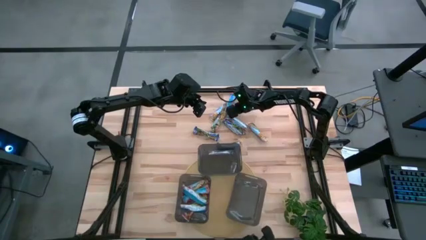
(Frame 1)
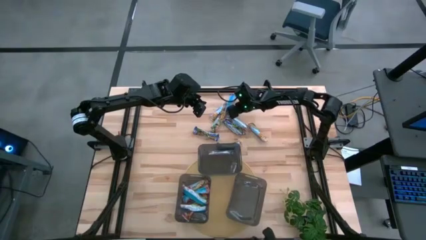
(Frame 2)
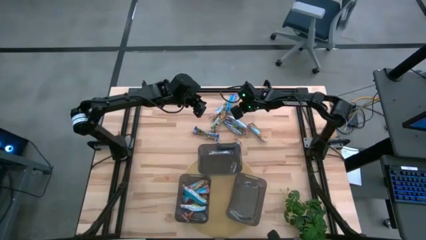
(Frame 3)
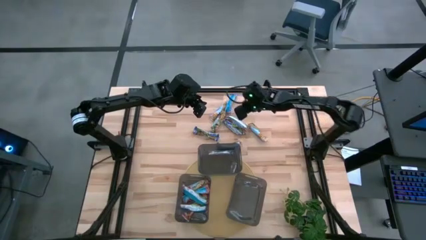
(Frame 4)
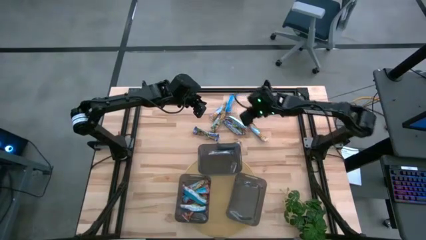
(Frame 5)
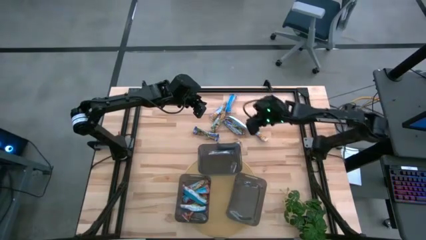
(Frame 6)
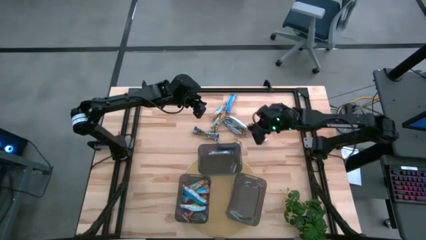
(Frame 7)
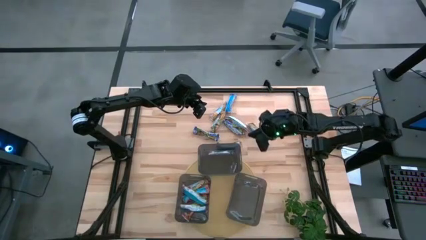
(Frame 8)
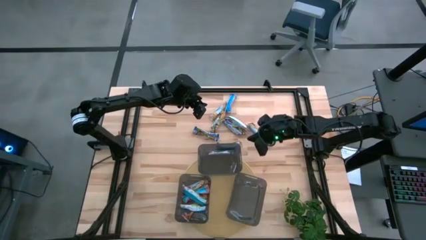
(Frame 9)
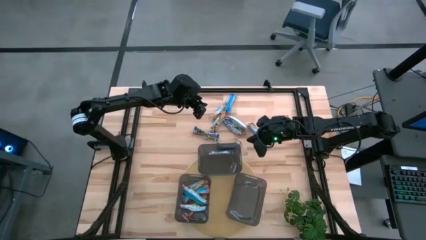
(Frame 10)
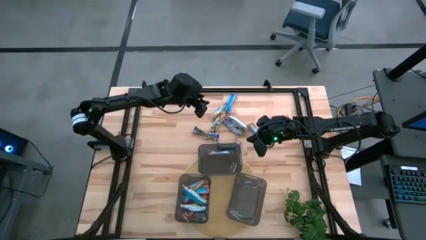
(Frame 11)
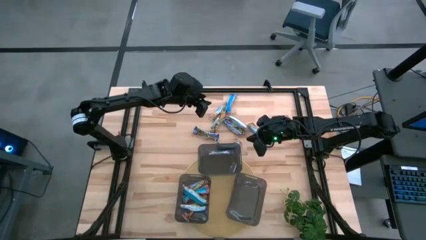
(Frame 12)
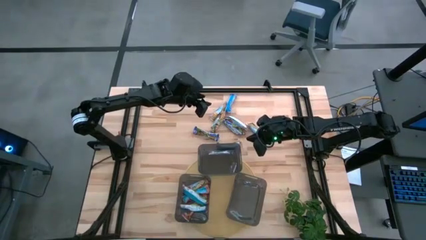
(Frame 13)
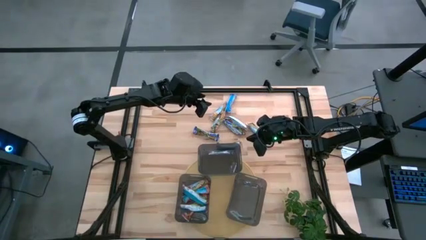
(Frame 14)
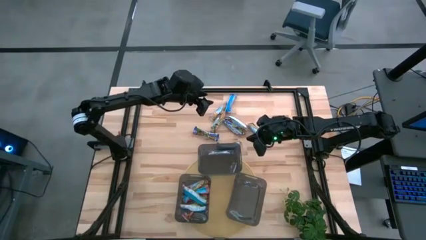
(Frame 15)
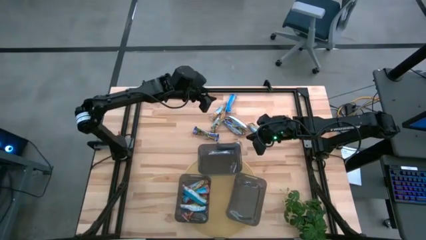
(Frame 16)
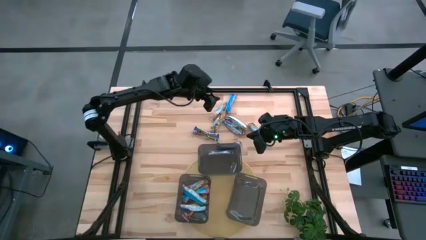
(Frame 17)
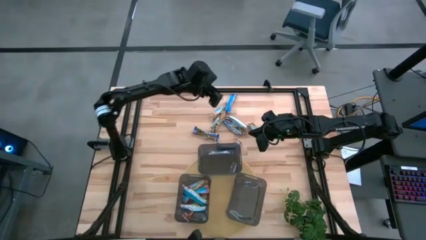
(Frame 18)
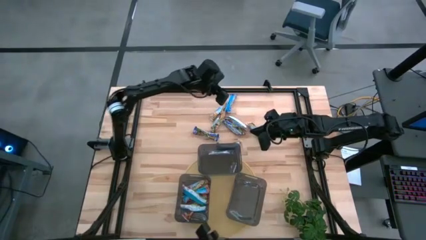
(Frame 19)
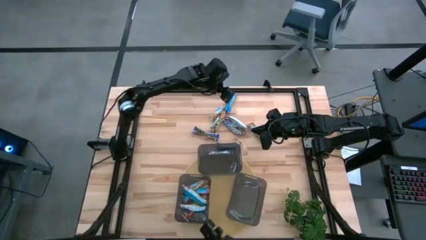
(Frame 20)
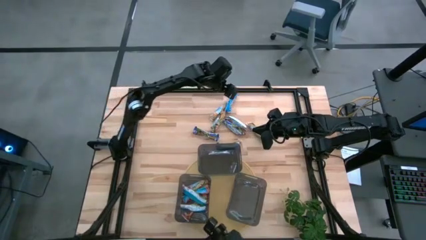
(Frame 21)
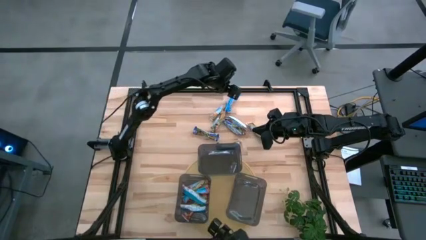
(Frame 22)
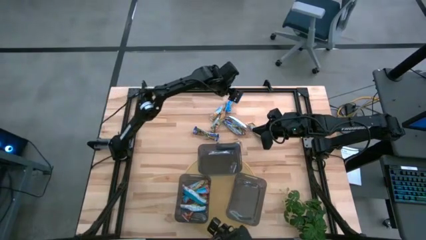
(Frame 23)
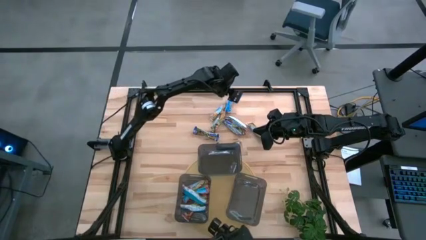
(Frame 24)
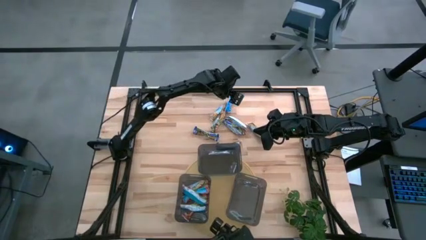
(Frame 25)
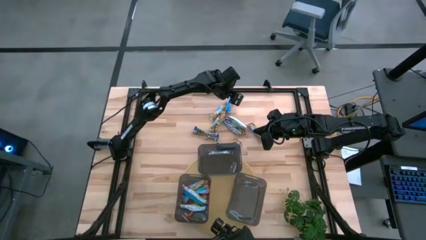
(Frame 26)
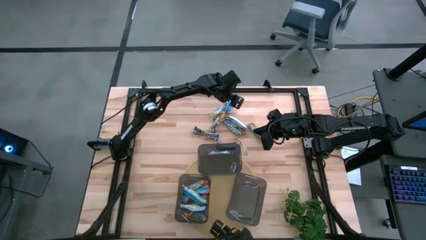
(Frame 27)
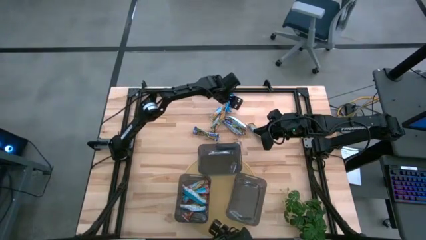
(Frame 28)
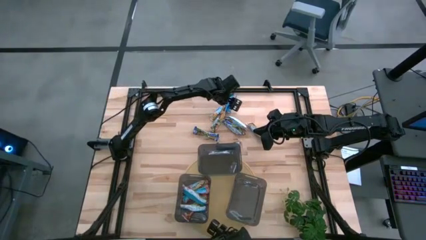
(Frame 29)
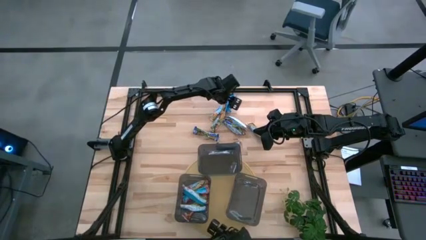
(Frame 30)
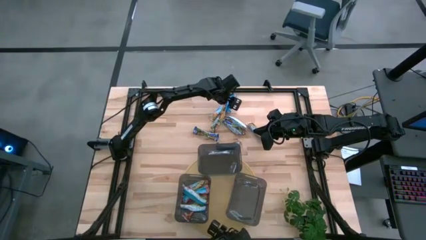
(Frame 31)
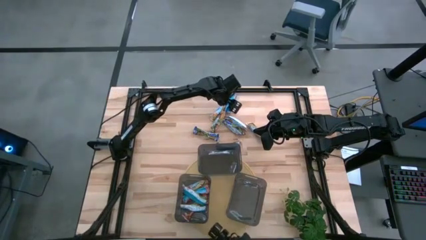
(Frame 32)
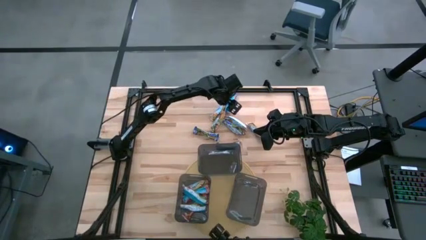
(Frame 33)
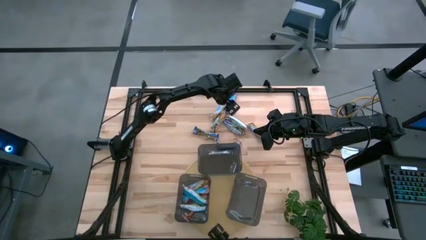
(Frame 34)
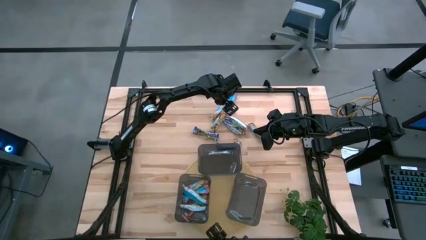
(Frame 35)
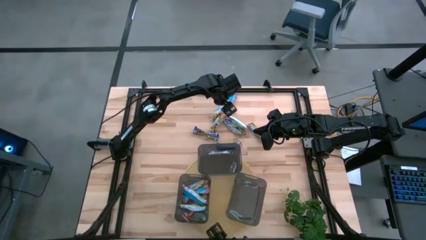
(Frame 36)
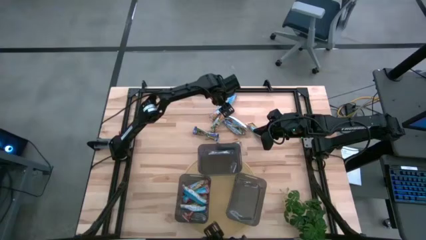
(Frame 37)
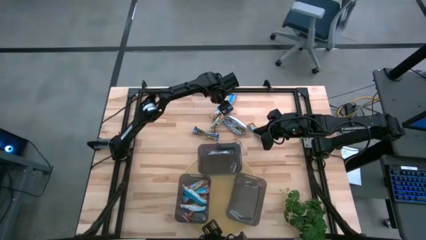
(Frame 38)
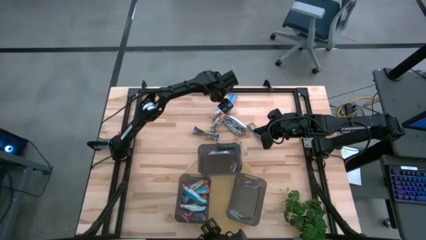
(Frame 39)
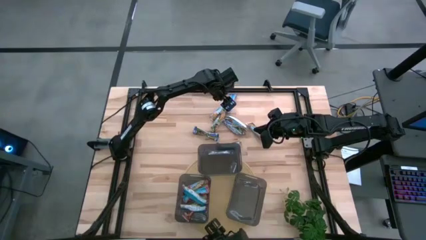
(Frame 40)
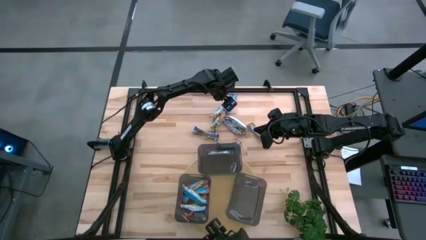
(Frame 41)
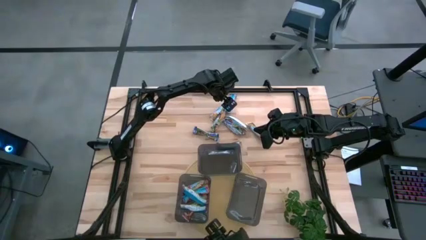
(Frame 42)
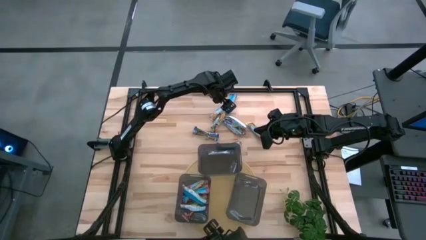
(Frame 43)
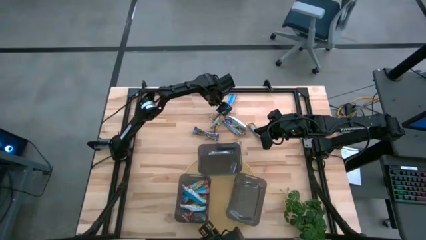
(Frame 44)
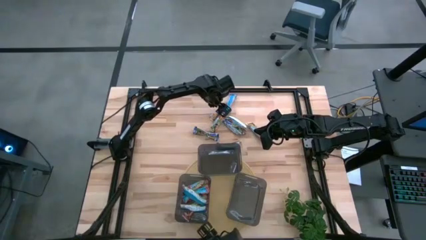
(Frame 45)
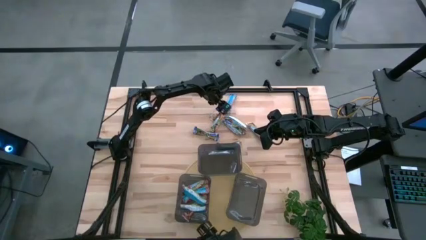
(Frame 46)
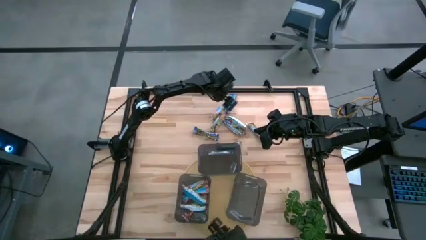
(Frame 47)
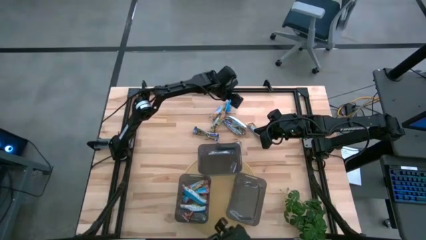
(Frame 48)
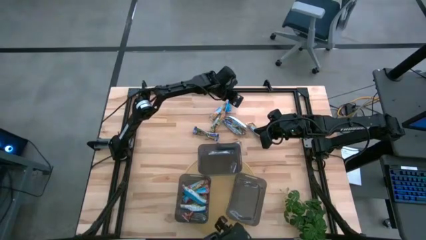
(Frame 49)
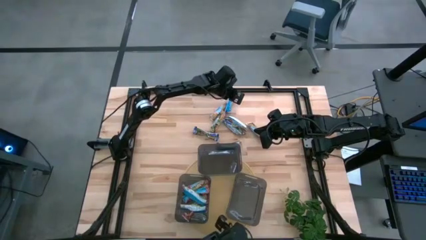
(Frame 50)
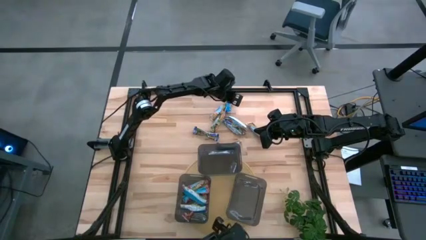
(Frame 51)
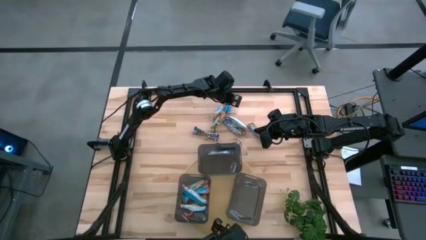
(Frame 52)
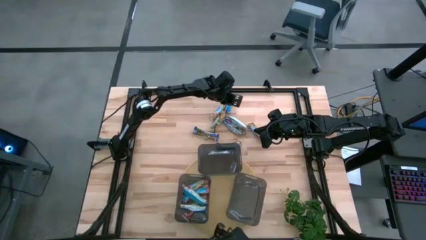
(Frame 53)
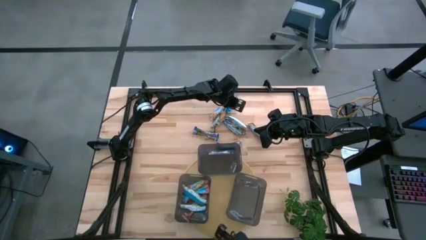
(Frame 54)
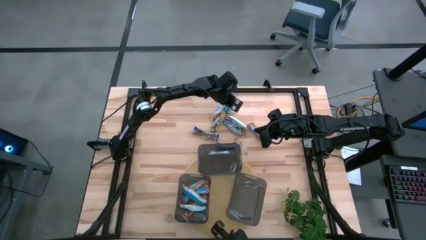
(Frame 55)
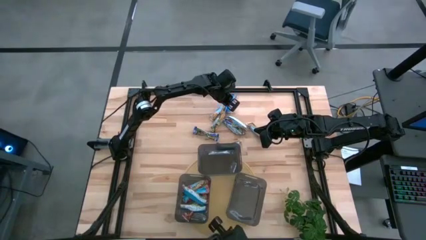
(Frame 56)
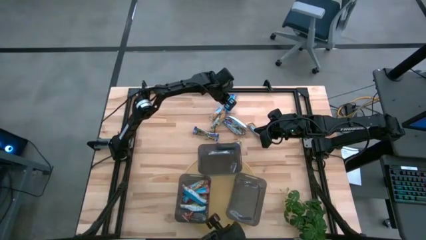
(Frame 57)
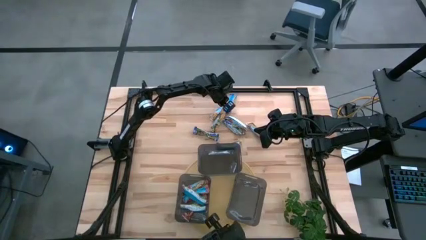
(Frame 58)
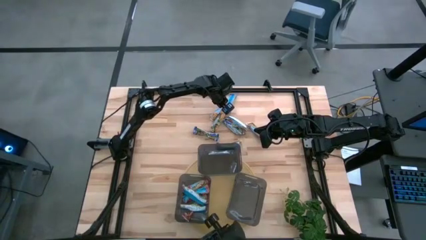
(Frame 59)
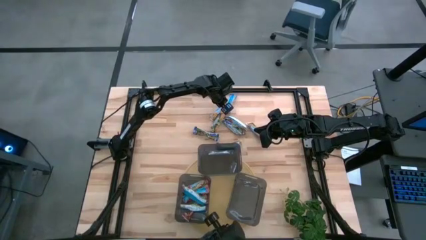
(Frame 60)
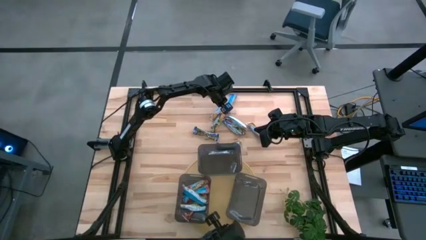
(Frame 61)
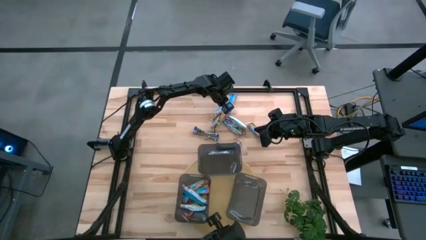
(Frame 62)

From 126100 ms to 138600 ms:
Task: Pick and place Granola Bars by type
Put the bottom right blue granola bar into the top black bin

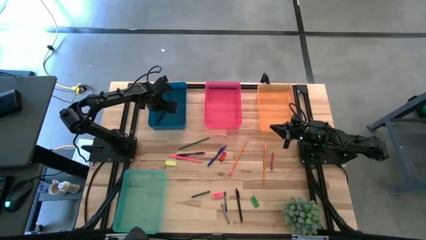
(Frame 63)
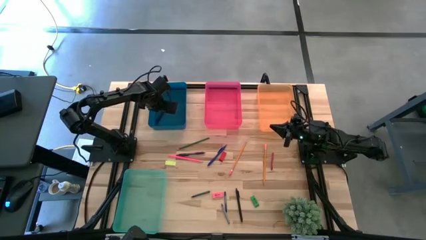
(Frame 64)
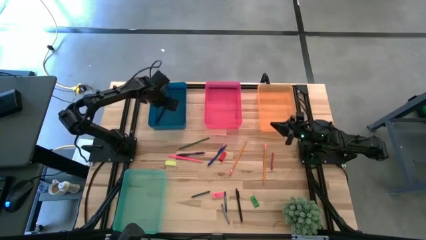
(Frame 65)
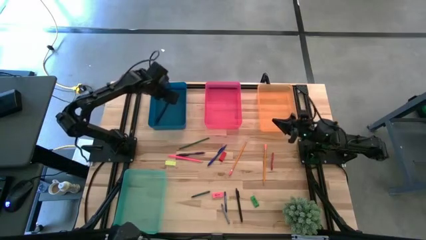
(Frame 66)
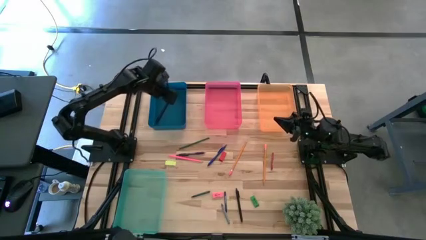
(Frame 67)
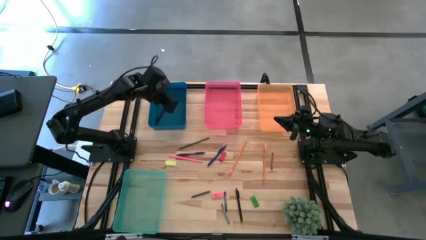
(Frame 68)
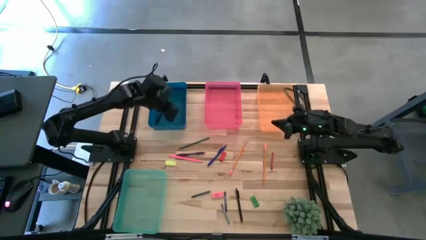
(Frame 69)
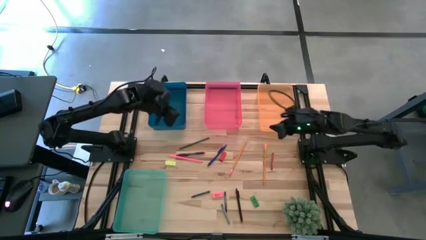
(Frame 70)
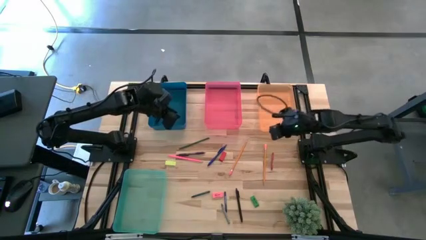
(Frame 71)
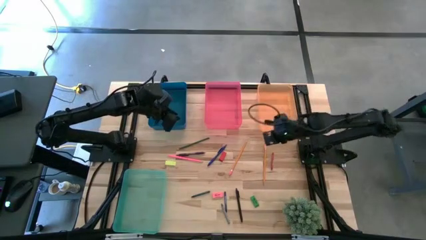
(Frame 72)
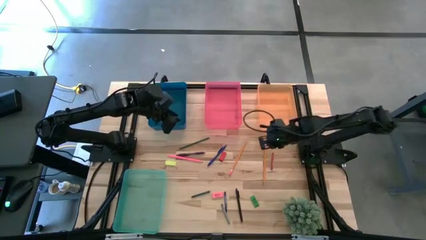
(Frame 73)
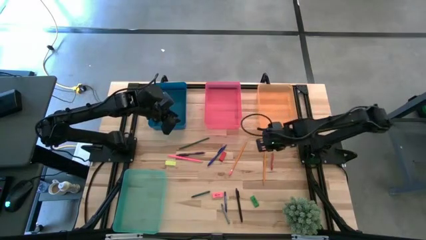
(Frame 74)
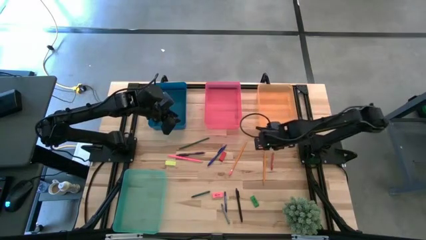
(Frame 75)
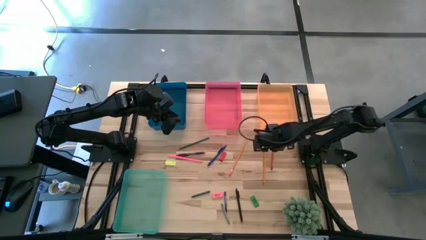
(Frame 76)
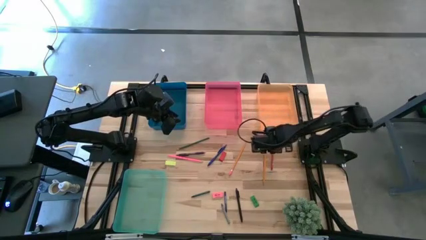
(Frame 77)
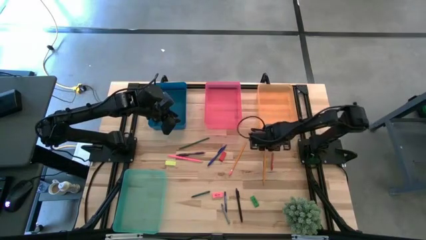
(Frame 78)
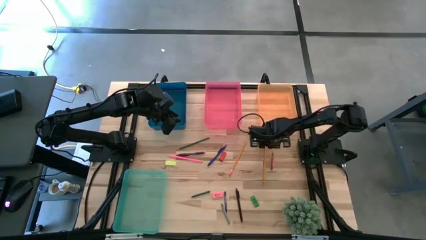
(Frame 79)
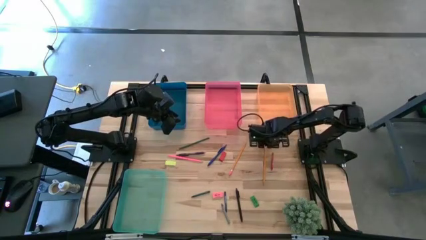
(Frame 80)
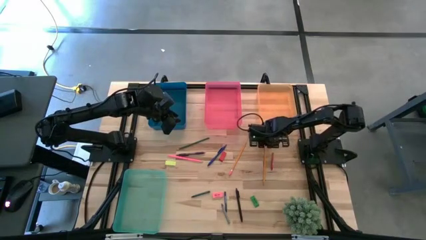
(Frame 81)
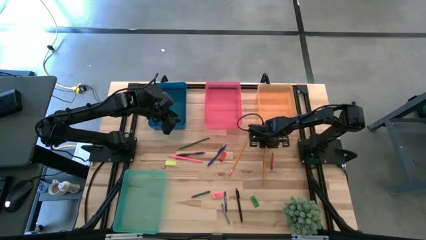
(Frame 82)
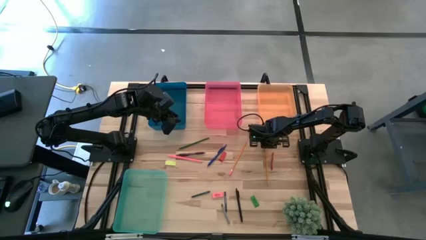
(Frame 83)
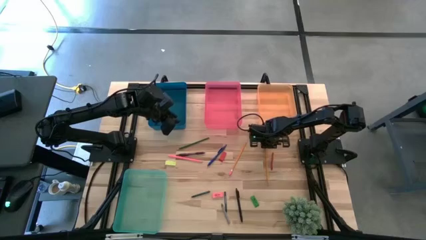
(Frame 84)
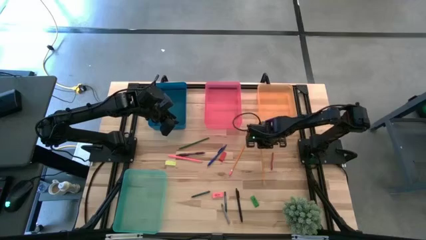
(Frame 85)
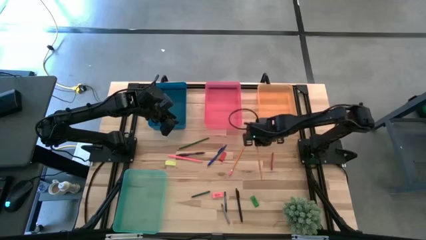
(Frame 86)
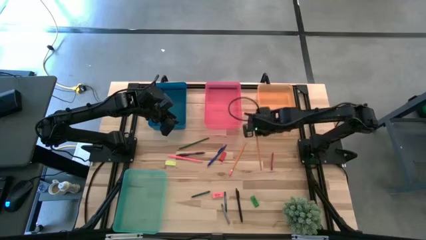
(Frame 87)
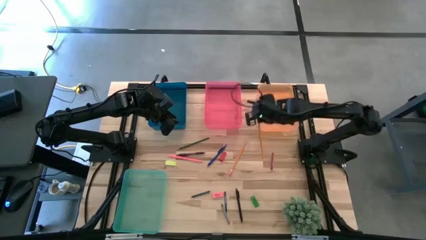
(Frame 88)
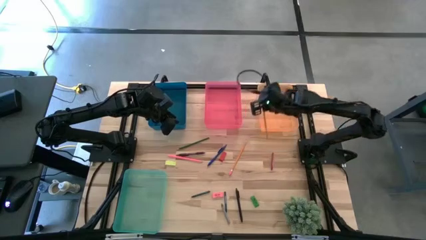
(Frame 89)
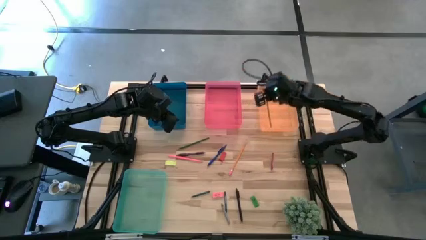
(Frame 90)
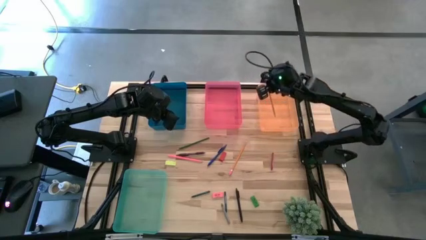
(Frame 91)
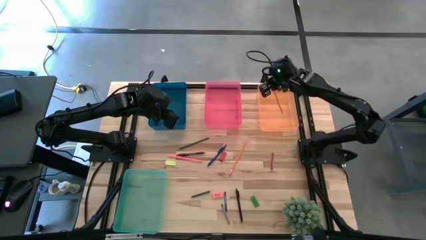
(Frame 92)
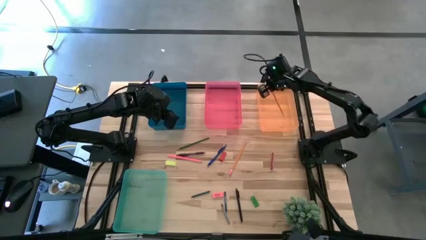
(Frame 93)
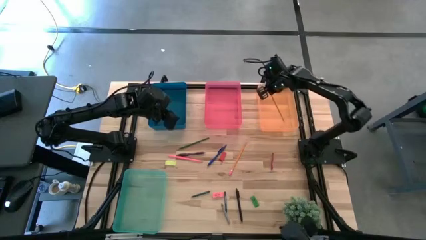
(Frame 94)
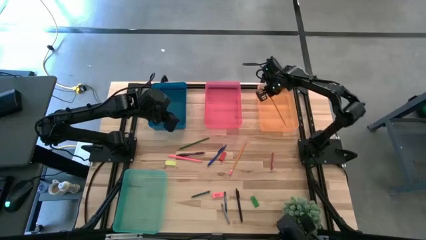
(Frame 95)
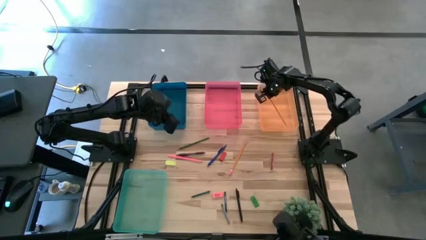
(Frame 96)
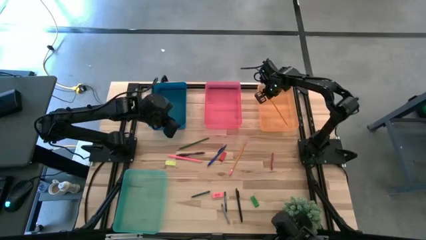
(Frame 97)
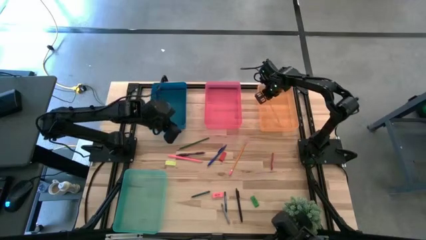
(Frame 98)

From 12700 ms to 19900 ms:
Task: Sort crayons/erasers/pens/pencils in bins
Put the right orange pencil into the orange bin
